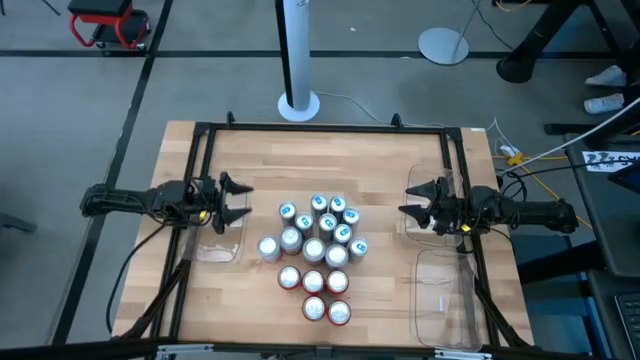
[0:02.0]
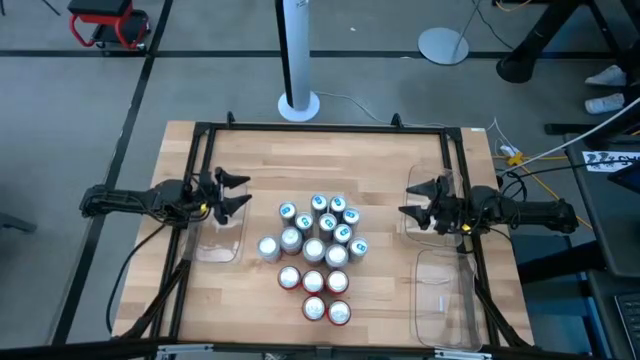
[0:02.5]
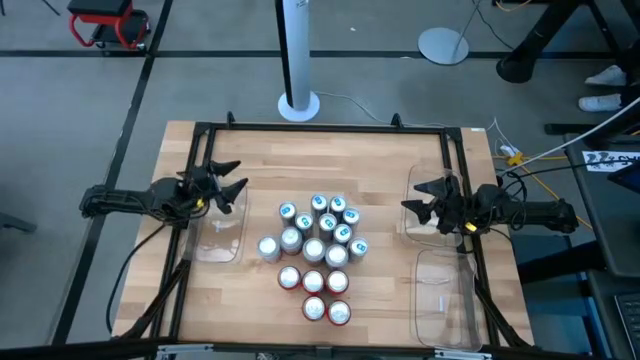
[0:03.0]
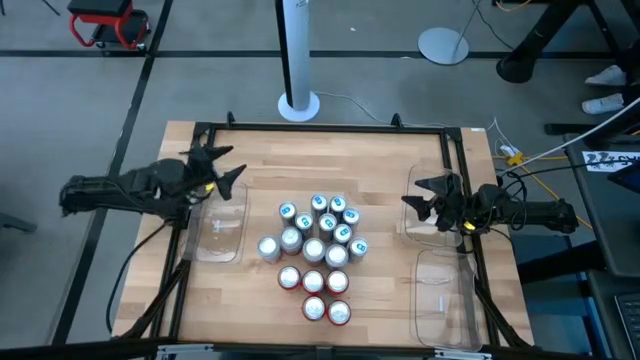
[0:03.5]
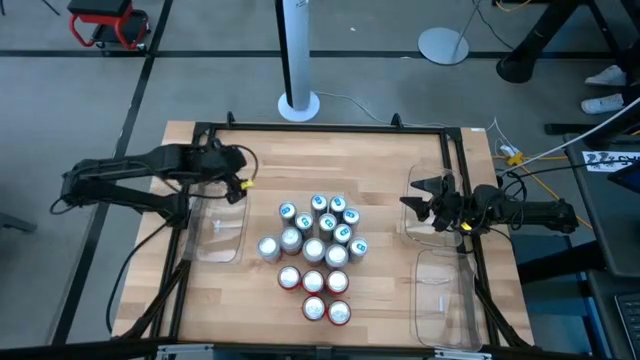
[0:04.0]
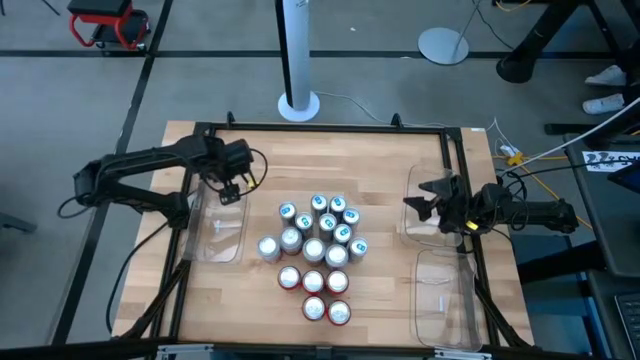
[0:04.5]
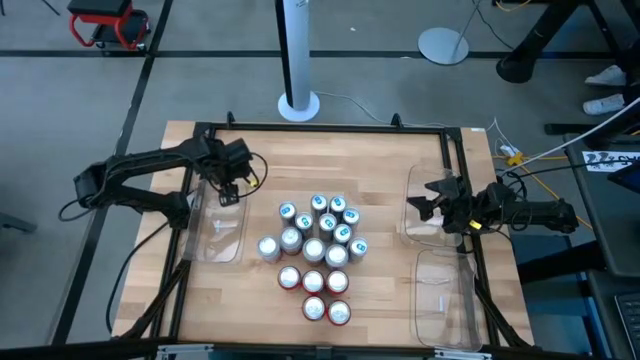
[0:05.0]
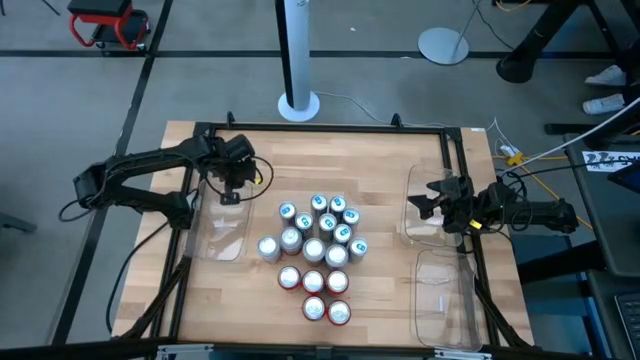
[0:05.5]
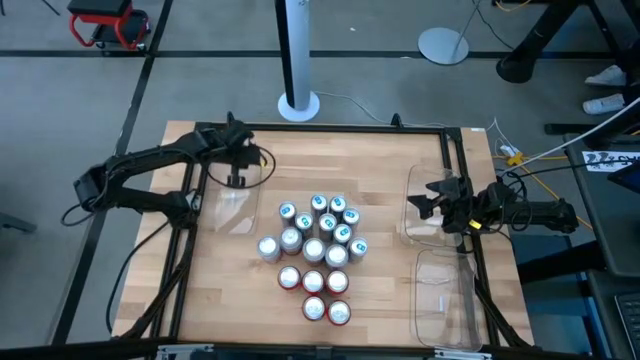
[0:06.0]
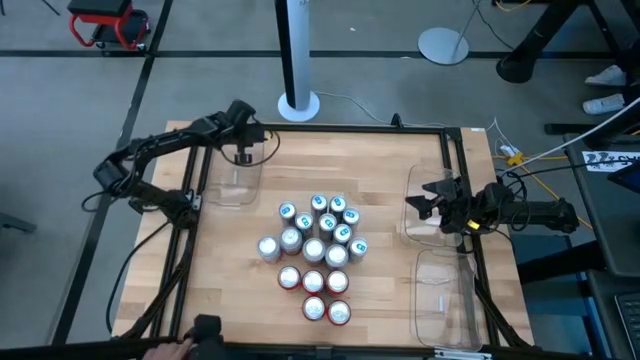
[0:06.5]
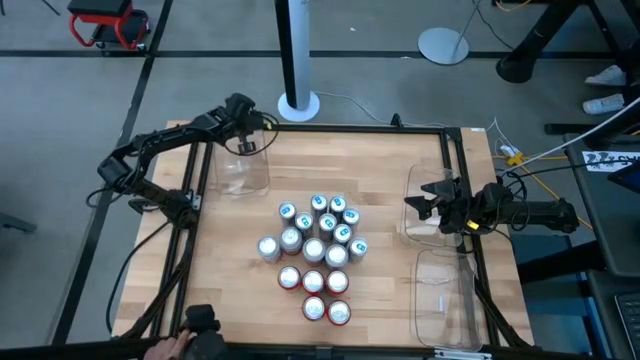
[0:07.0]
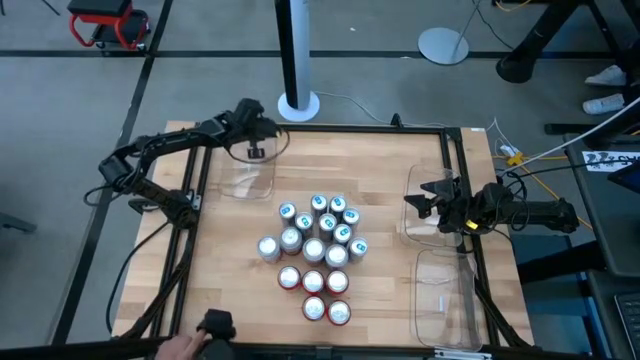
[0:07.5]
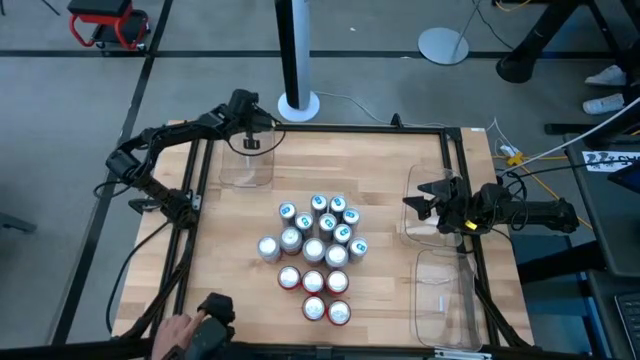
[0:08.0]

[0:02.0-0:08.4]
Task: Sort soda cans
Move the top left transparent bin to the top left of the table

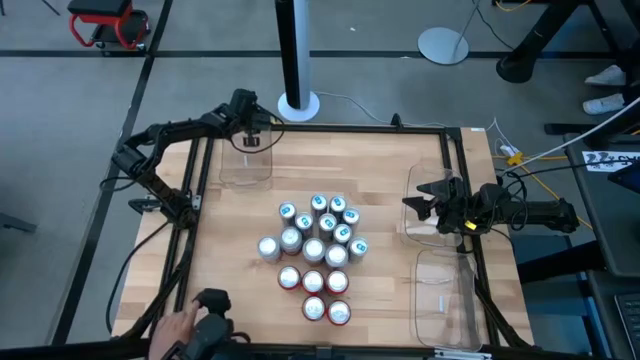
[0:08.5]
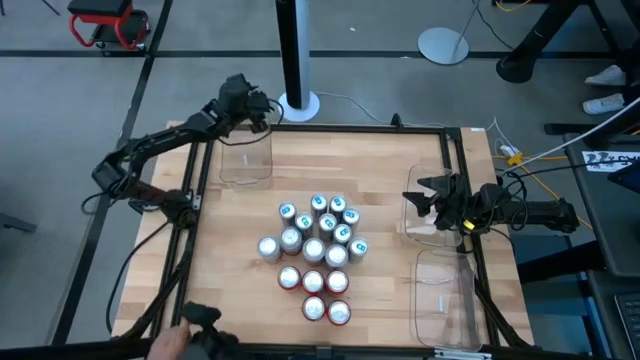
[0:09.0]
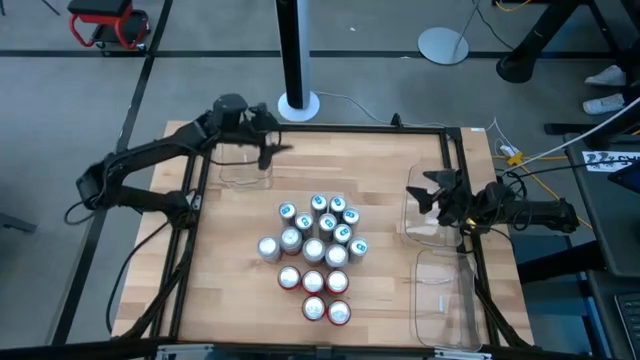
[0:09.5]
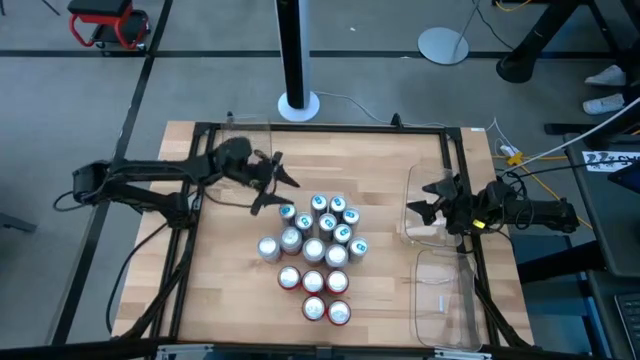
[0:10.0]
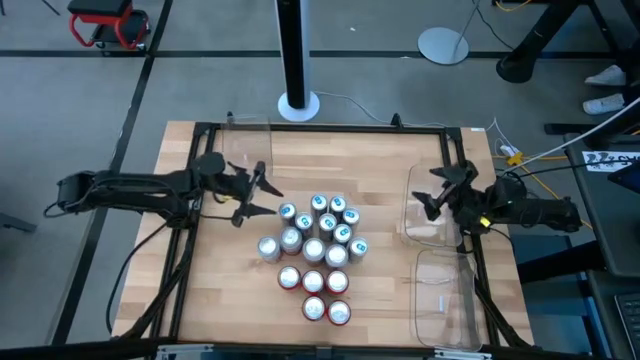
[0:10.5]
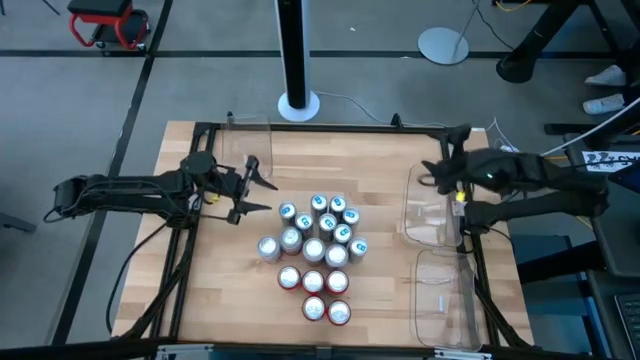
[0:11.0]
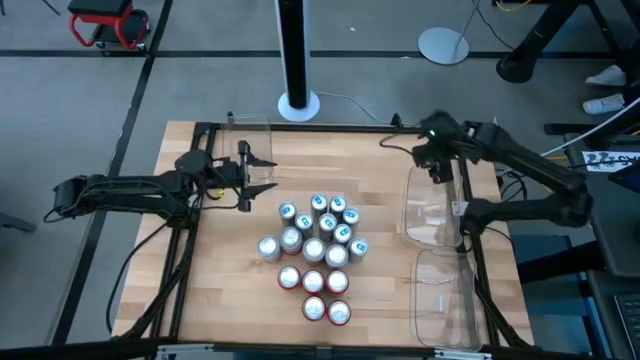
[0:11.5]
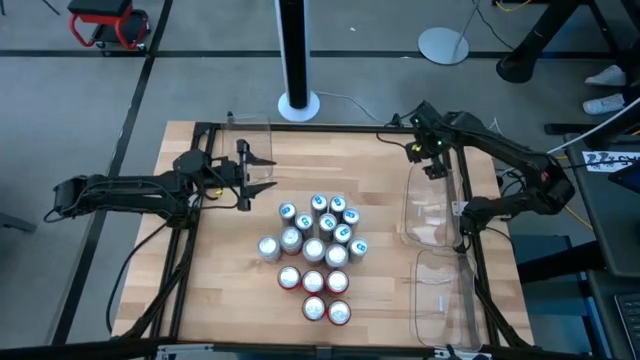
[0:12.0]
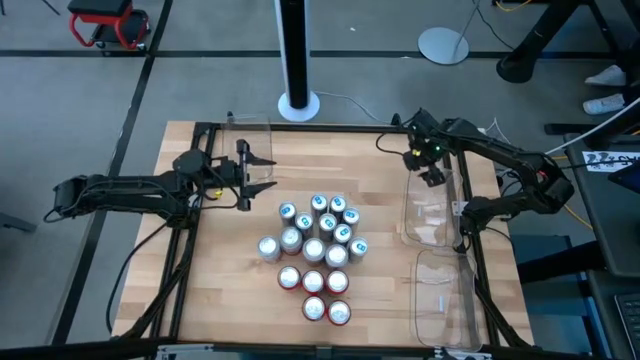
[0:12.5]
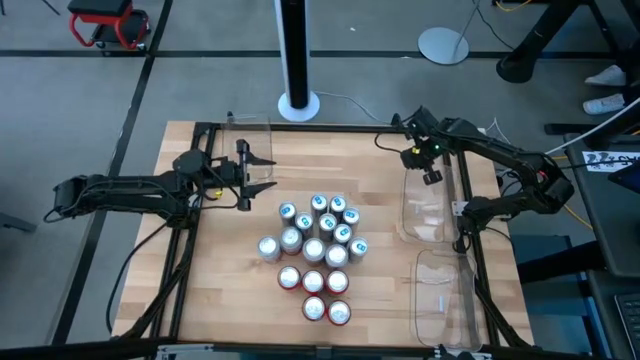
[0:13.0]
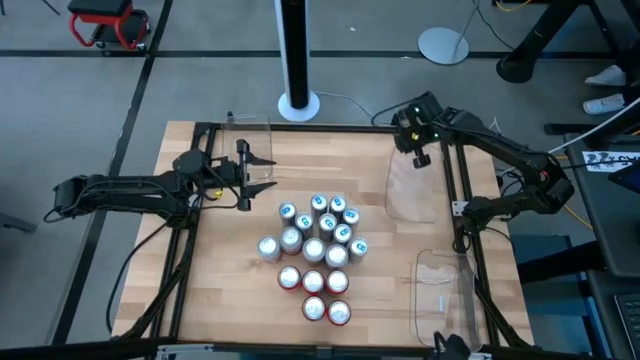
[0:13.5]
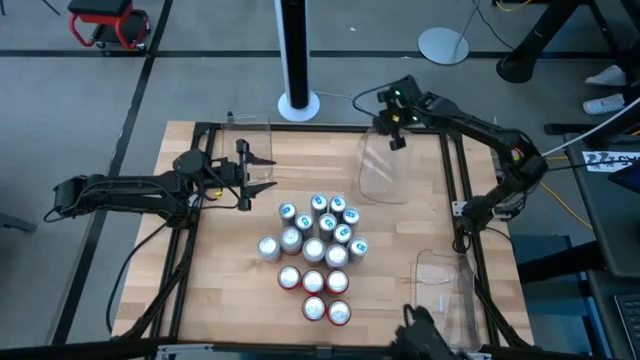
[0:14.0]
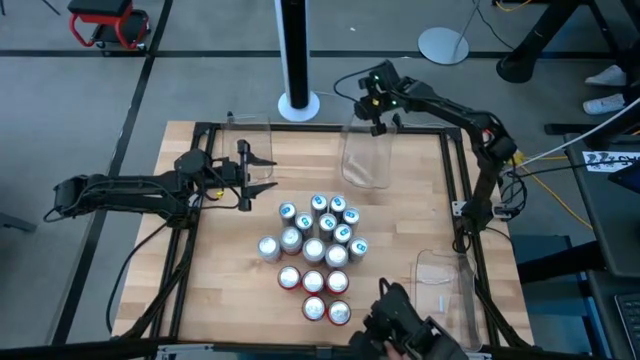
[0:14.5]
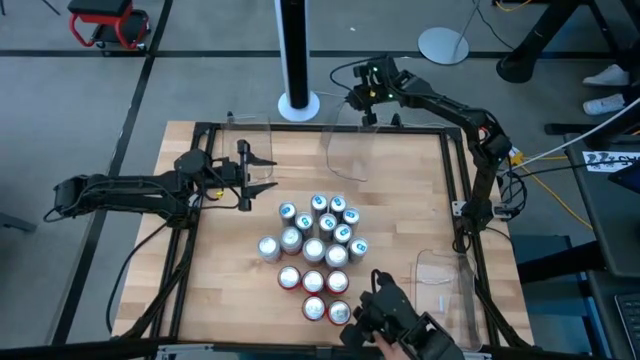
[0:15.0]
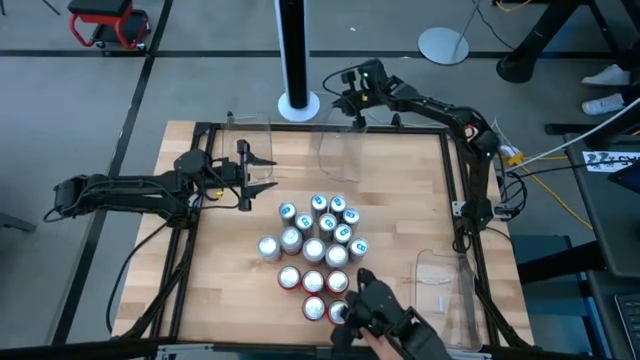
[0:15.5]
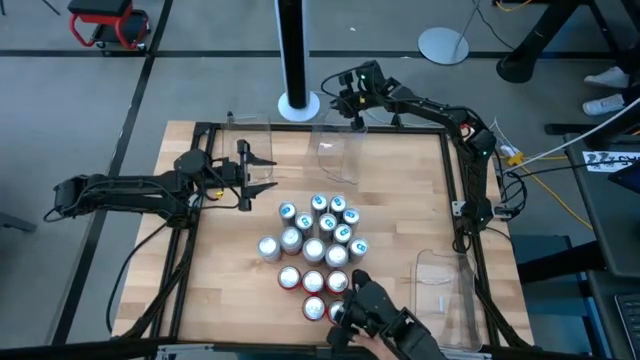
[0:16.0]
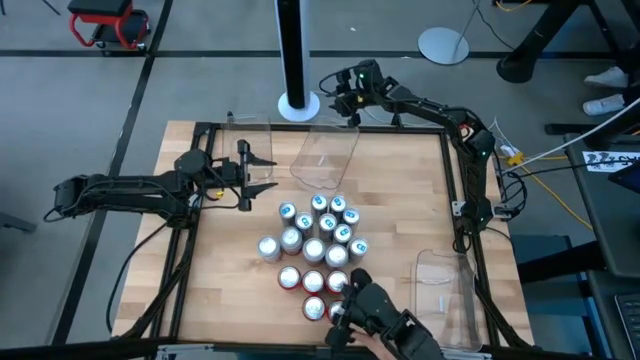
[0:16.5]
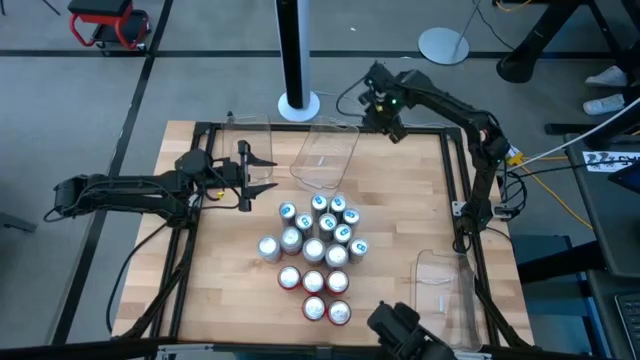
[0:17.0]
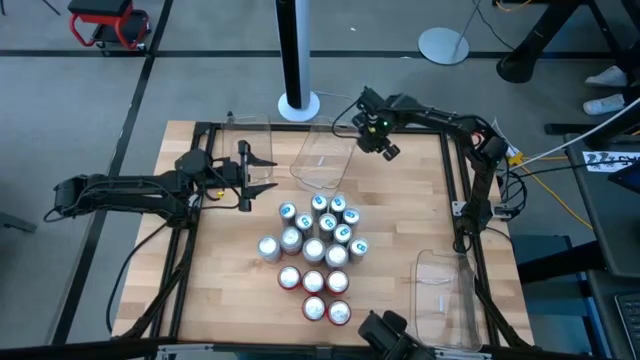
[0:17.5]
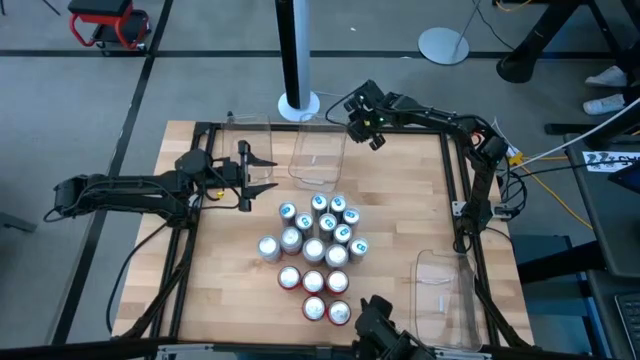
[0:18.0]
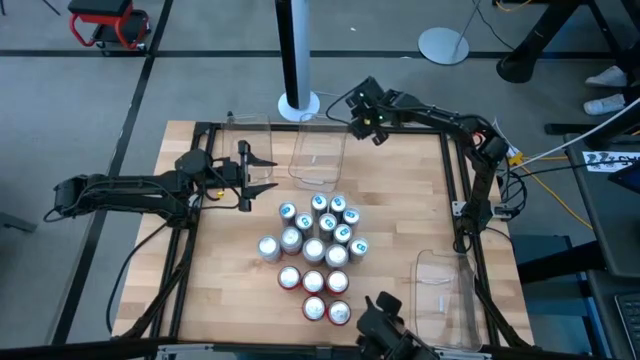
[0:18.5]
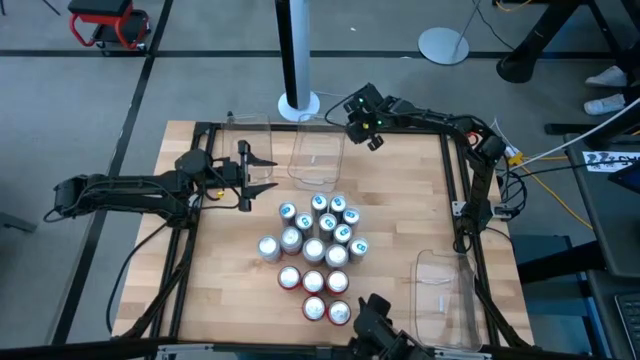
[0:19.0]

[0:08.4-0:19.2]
Put the center transparent bin to the top center of the table

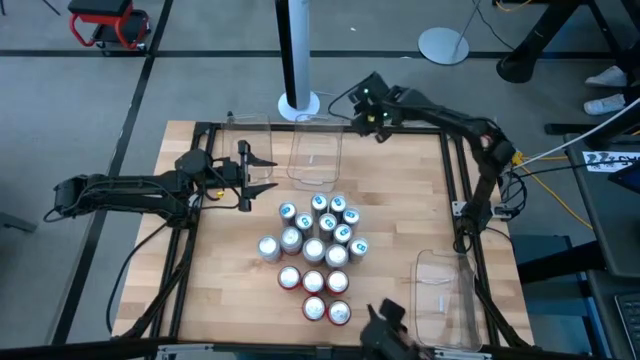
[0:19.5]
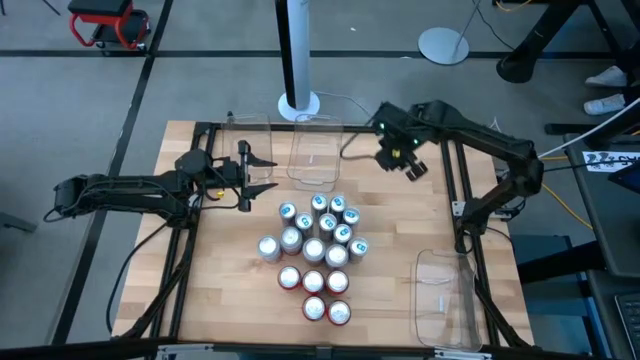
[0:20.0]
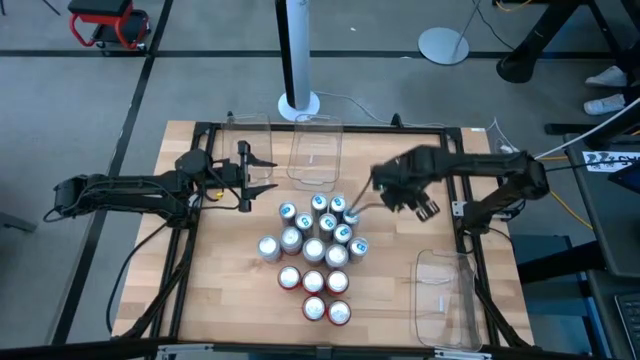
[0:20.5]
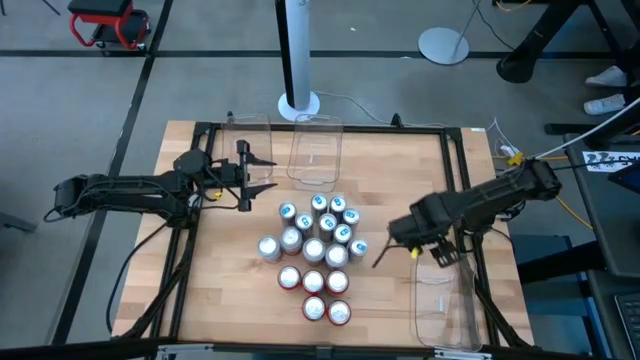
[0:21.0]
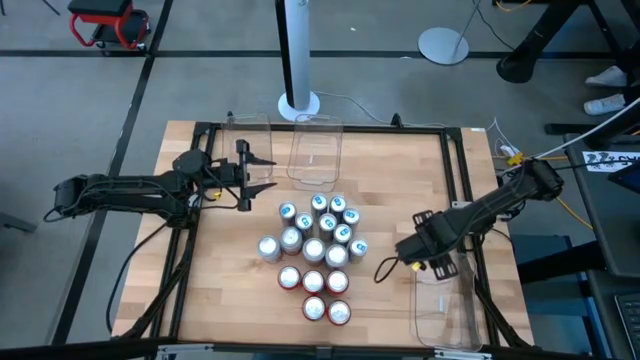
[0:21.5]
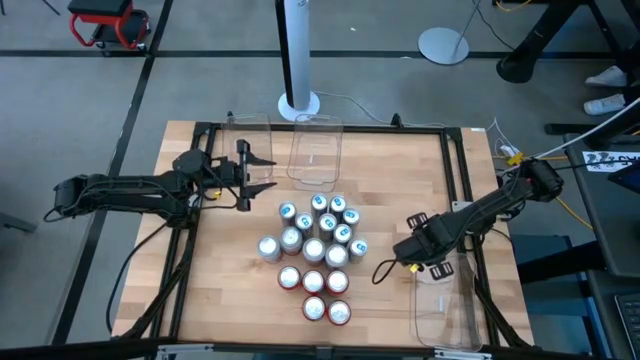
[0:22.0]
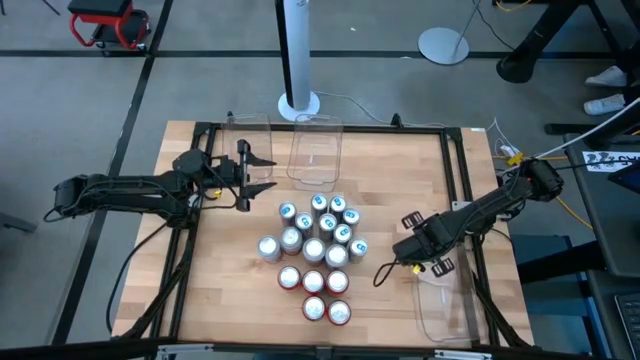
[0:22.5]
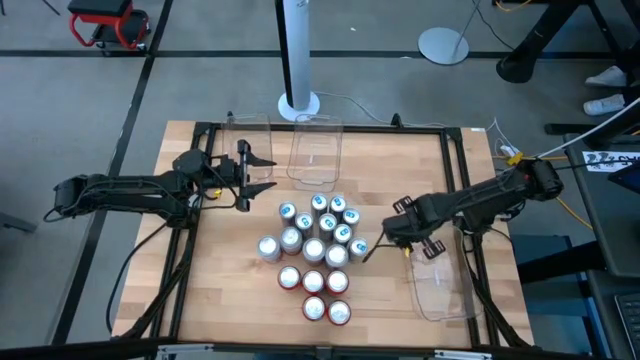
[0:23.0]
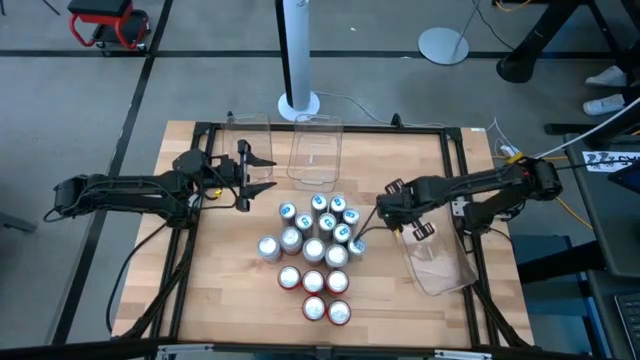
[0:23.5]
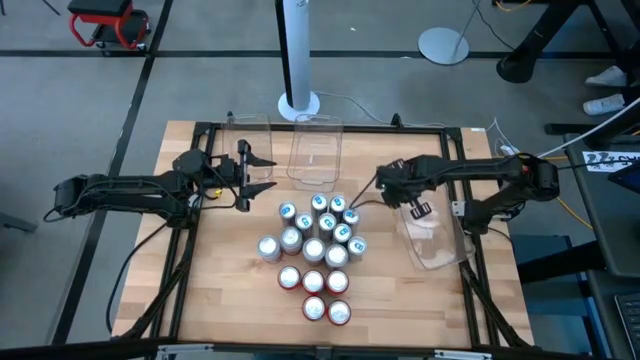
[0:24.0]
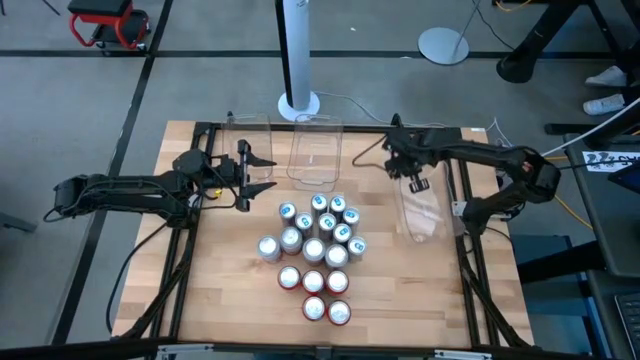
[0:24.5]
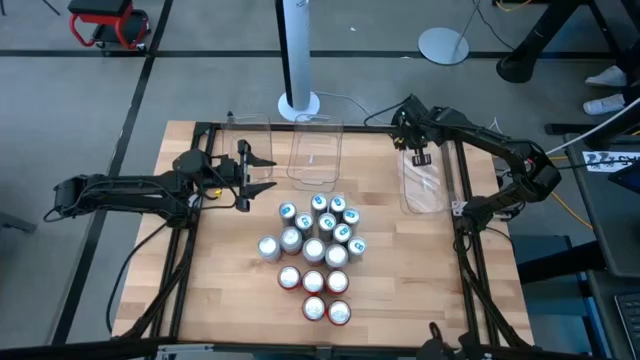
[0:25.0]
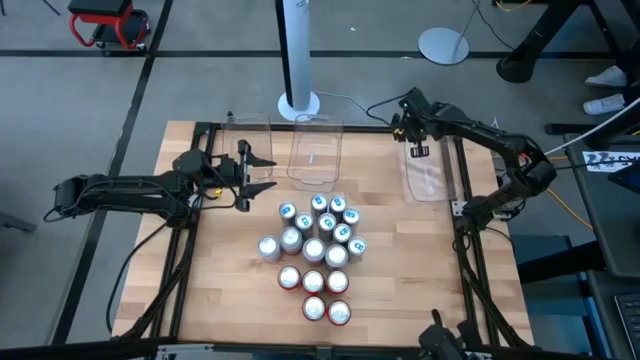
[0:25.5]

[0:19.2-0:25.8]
Put the bottom transparent bin to the top right of the table
